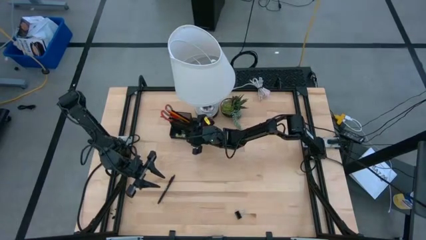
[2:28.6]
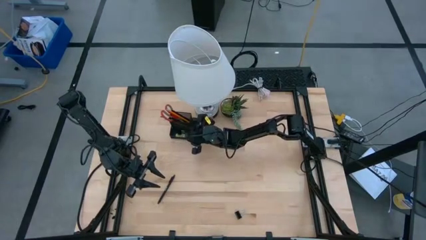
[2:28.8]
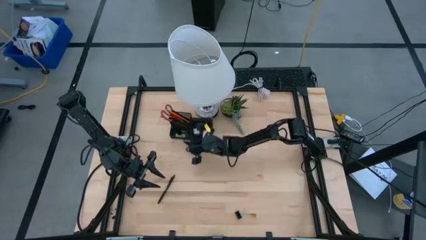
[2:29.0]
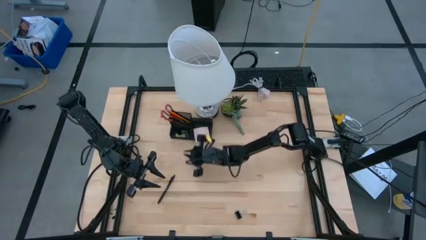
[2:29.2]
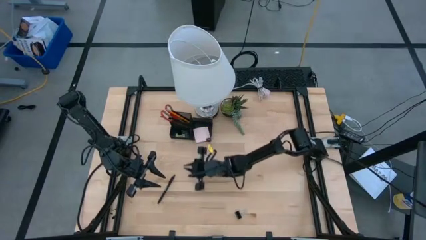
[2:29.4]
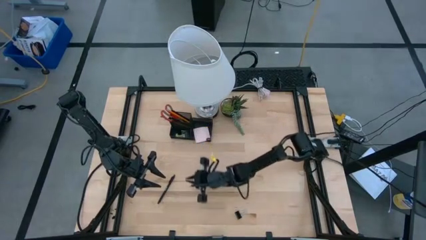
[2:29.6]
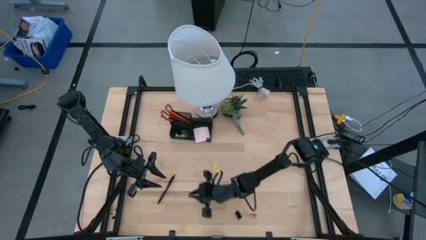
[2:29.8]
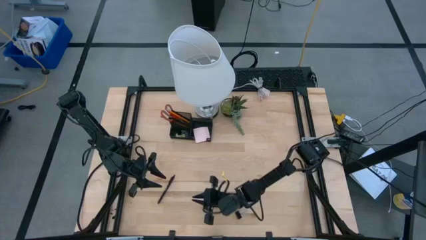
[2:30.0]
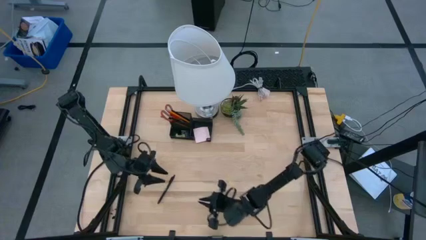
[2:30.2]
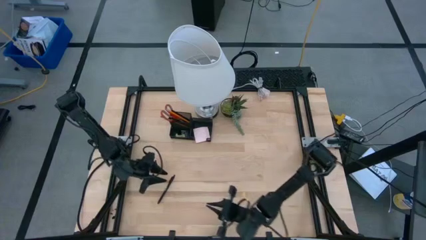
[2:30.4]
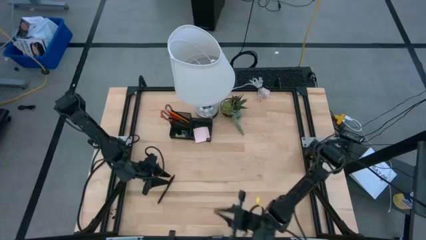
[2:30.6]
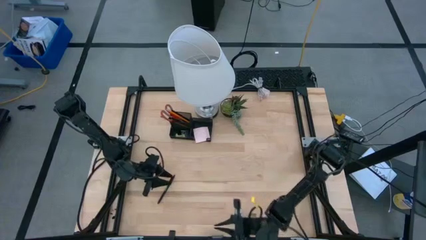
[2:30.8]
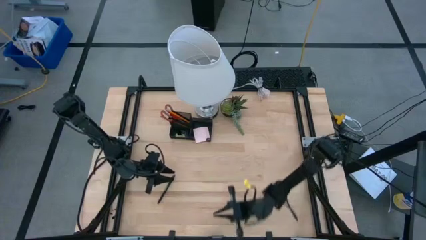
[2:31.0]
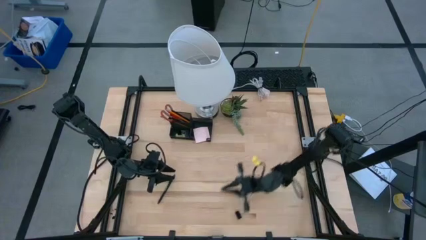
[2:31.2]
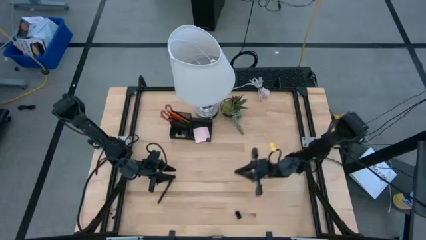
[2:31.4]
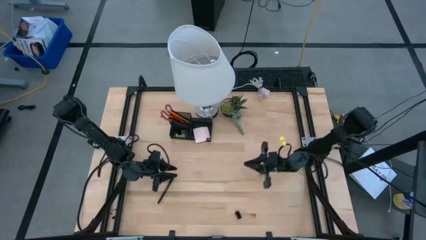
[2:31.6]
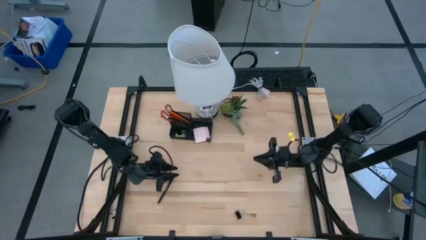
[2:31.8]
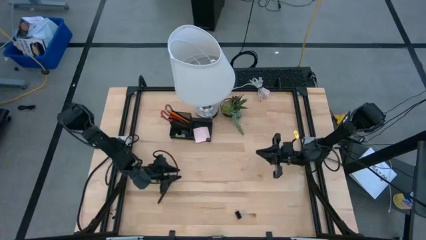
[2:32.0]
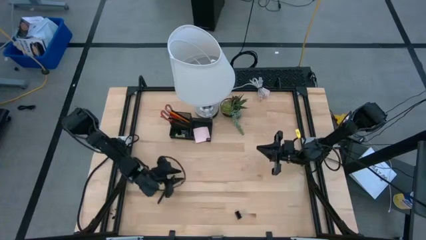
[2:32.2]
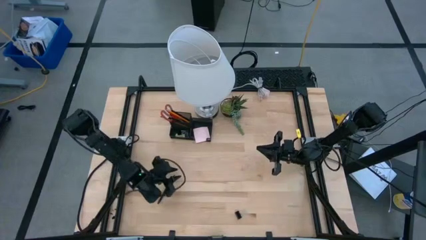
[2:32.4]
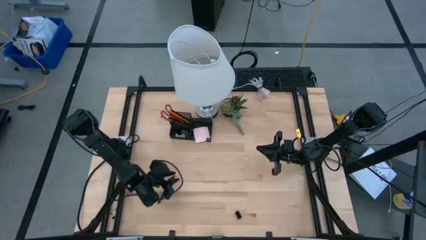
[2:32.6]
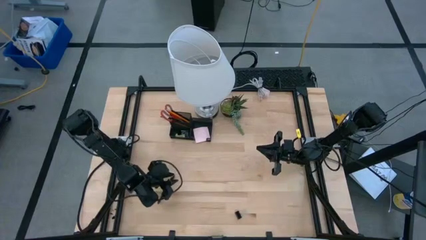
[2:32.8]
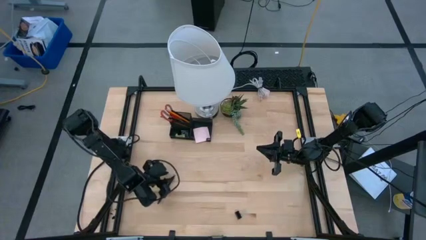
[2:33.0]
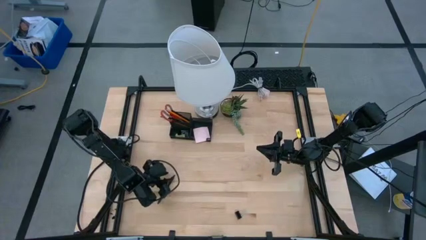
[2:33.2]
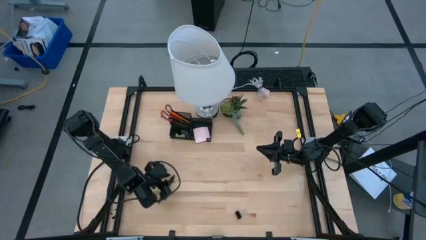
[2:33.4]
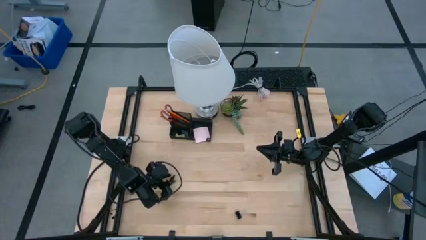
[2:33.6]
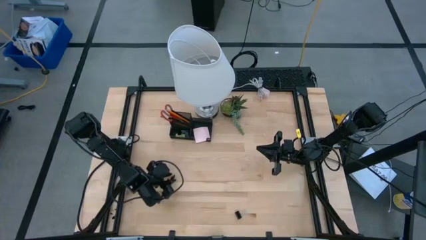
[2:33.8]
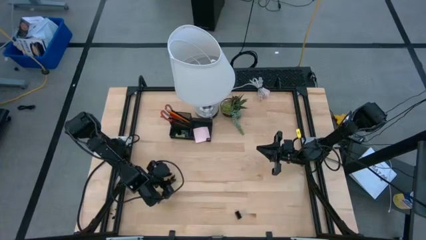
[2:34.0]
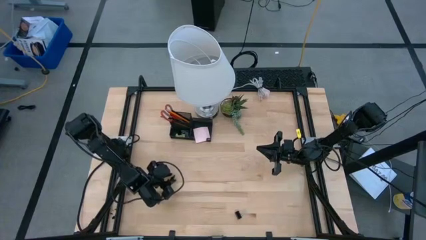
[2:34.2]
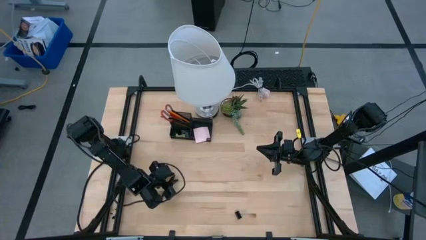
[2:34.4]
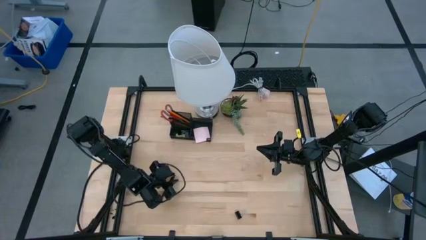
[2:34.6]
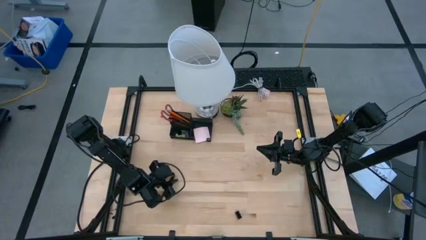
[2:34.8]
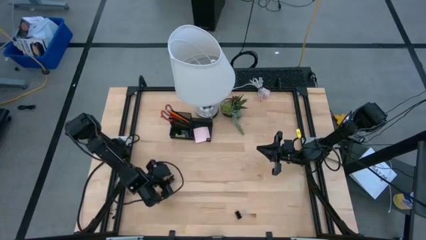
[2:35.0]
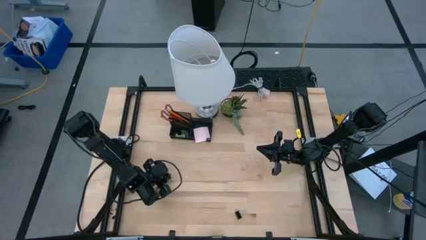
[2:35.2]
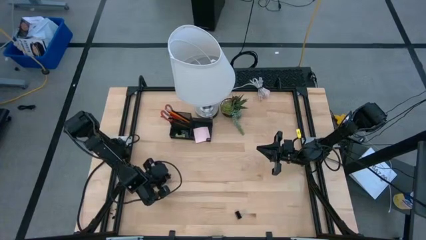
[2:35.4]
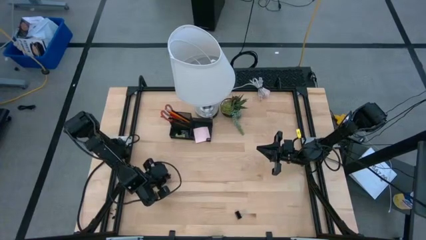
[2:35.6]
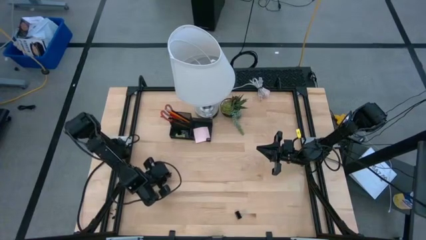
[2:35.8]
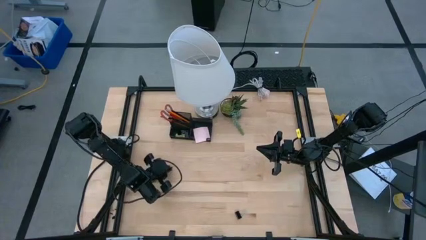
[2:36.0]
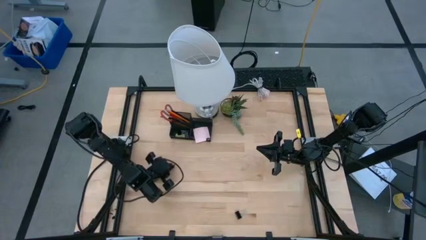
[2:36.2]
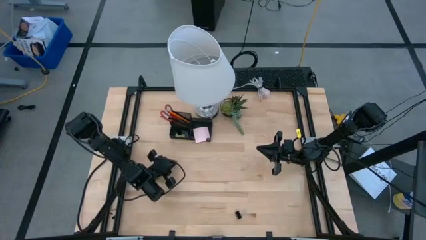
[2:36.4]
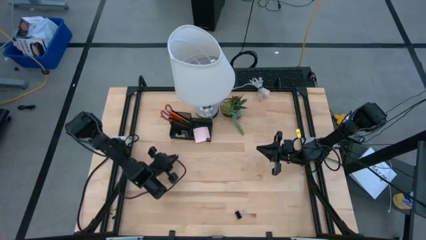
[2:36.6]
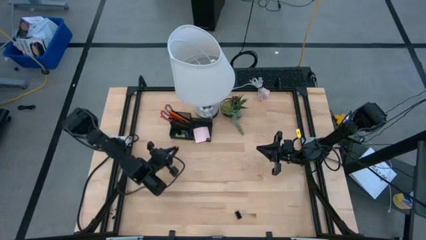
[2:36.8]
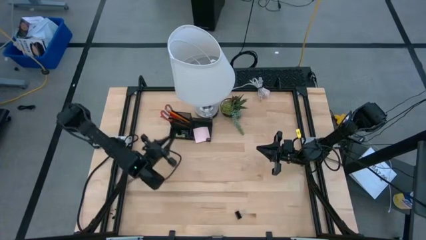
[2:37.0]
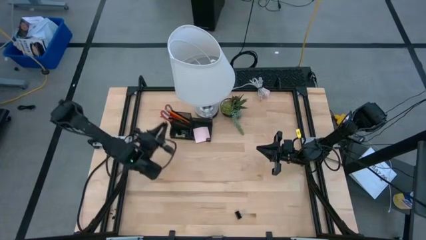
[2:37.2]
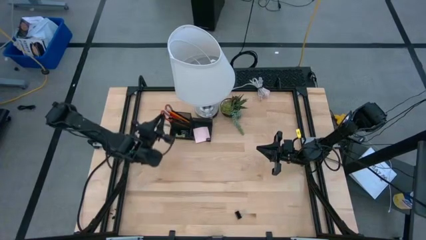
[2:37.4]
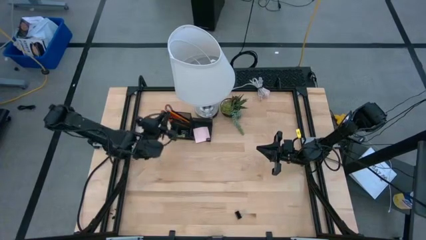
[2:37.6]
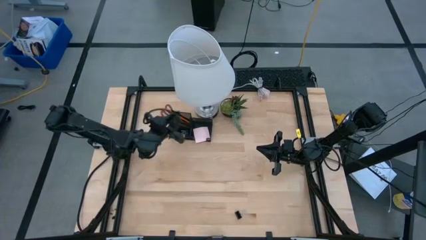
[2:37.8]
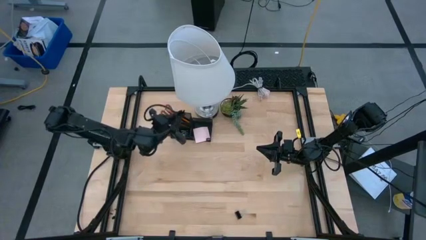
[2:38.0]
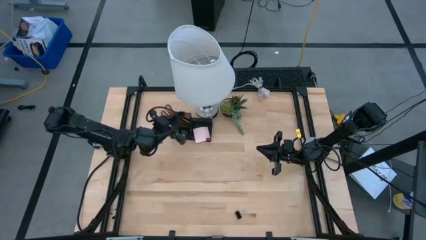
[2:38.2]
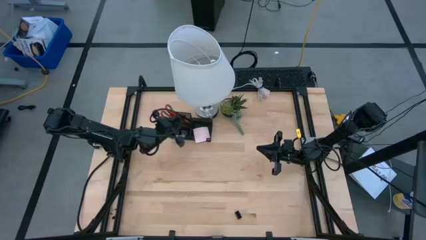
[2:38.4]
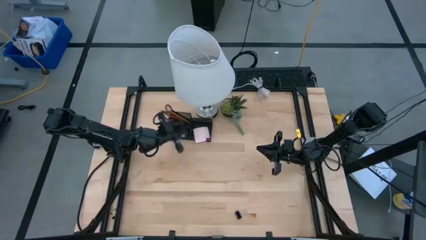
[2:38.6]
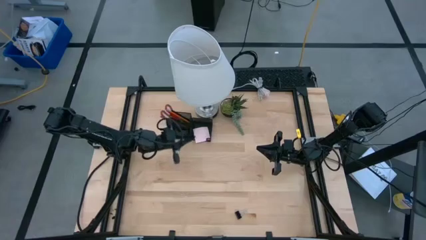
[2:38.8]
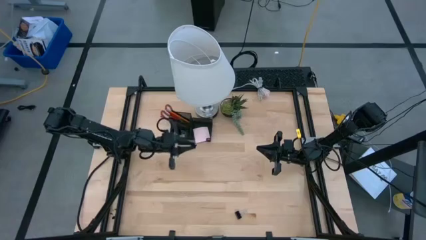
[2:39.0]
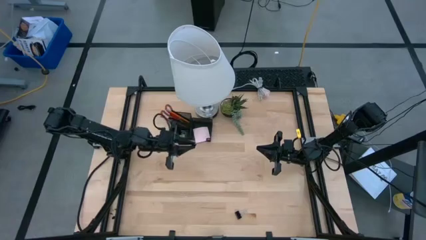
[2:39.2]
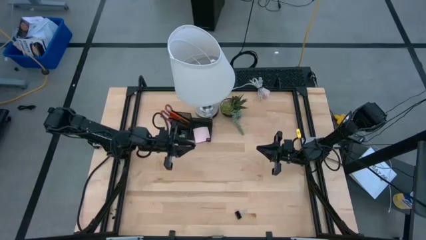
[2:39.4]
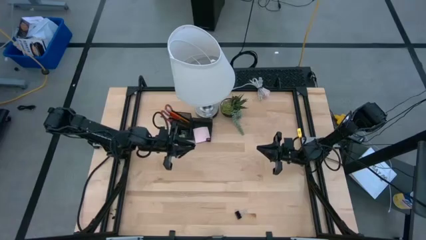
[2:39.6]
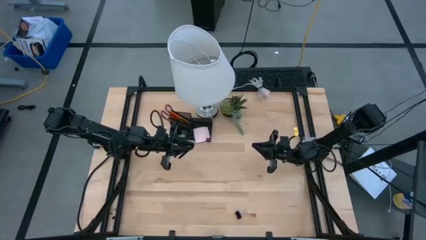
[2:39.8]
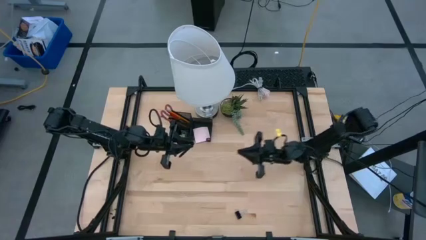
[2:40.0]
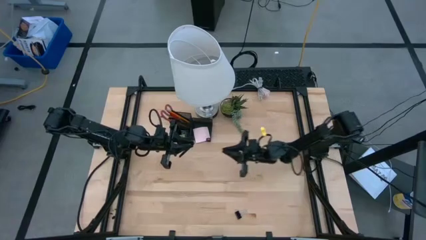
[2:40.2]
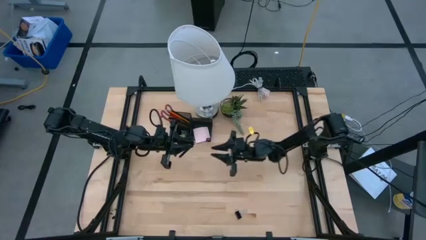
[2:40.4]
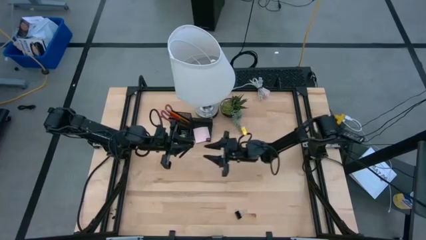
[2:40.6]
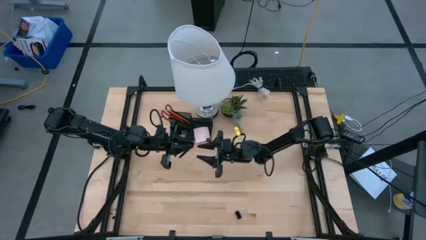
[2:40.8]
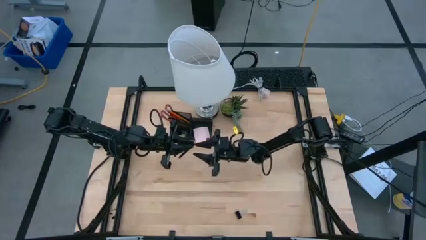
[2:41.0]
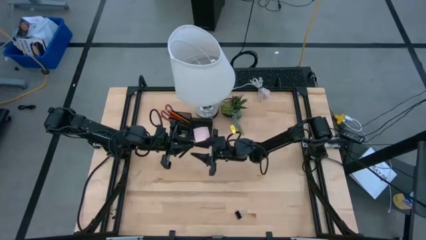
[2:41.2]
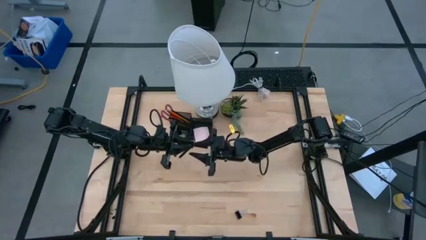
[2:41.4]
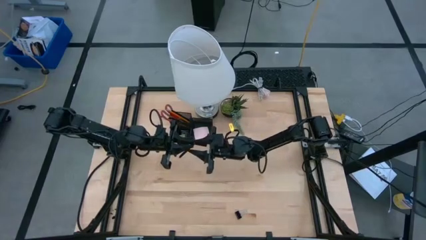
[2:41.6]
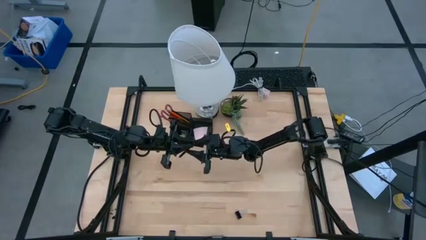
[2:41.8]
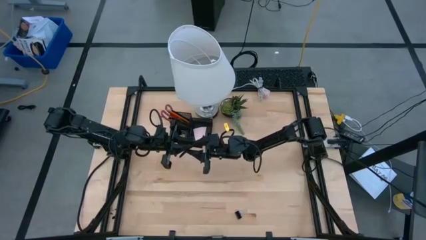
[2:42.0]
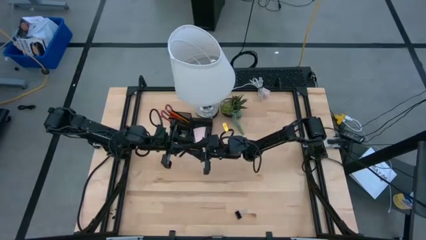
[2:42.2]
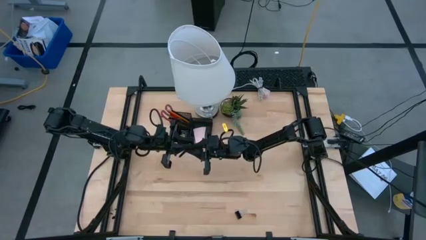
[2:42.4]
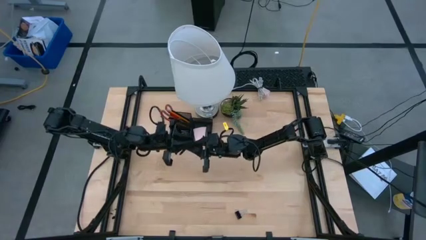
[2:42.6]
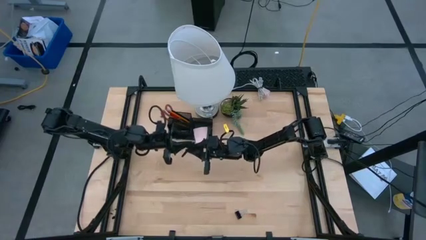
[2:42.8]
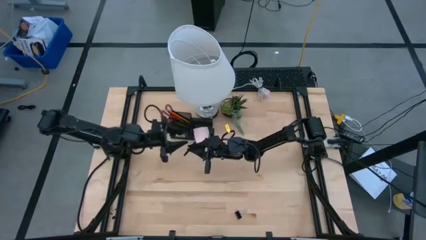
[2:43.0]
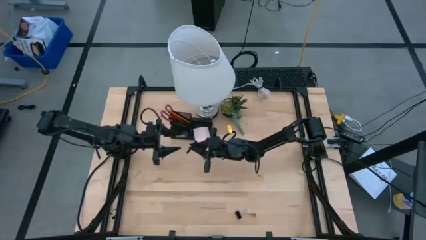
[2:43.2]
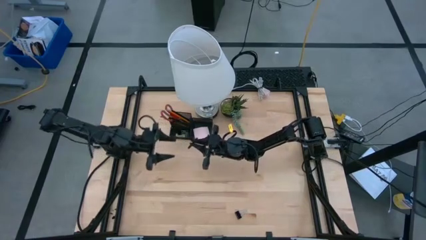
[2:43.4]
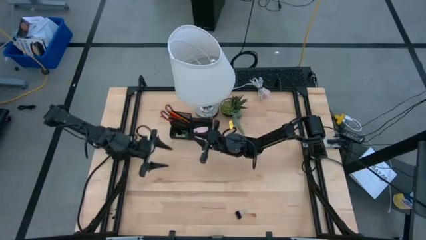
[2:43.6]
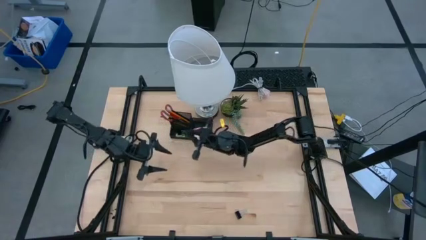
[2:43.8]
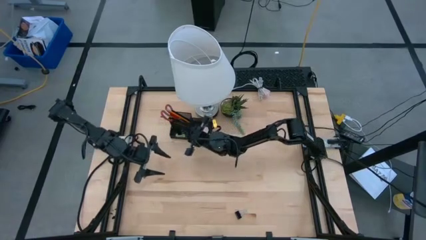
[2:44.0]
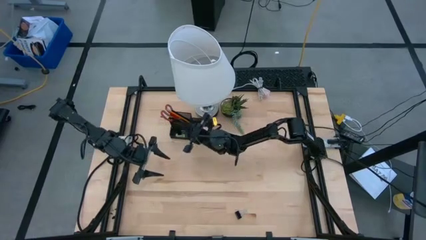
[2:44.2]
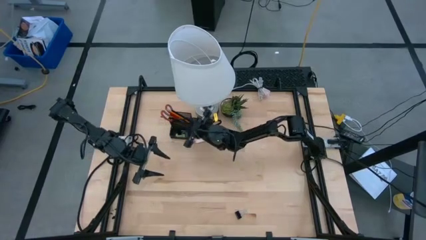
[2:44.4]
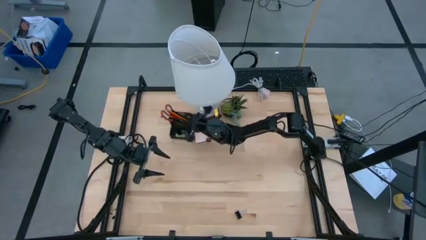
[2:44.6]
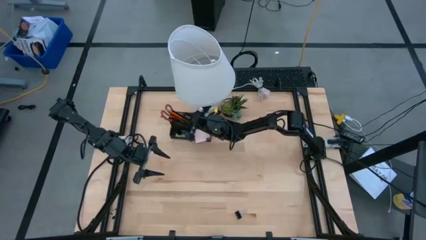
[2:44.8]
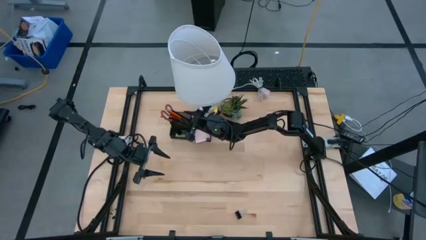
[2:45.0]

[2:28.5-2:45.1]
Task: Pick and place office supplies into organizer
Put the black pen into the black desk organizer
